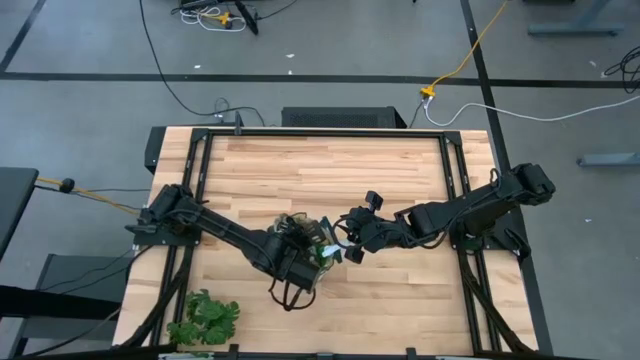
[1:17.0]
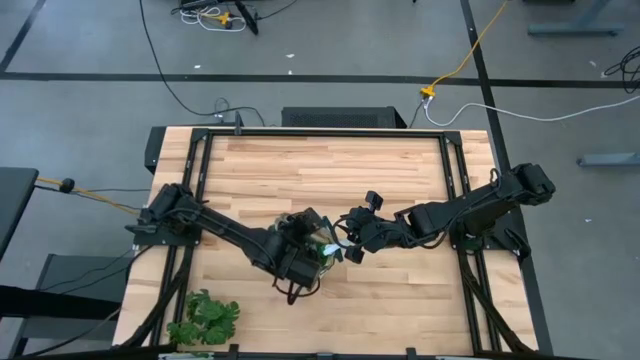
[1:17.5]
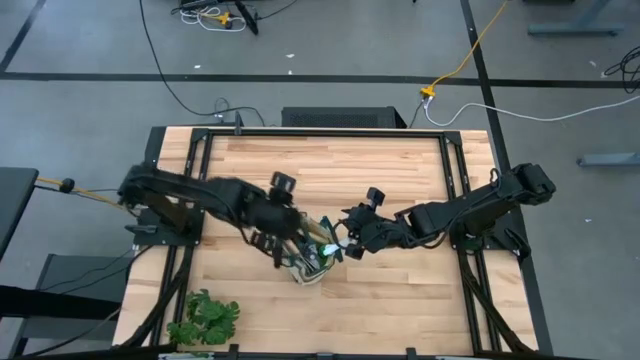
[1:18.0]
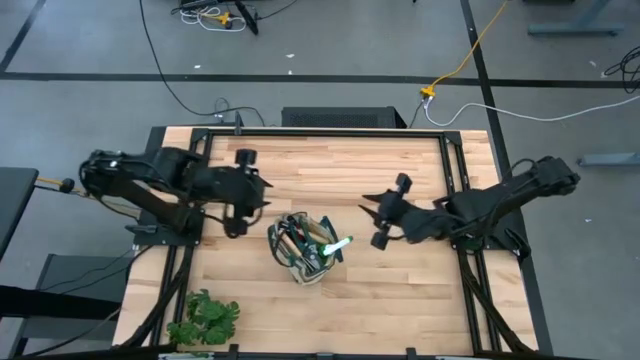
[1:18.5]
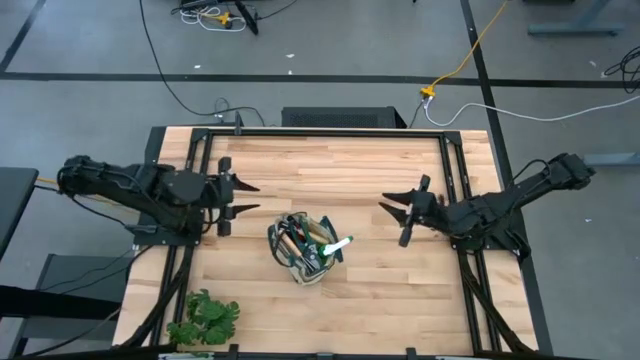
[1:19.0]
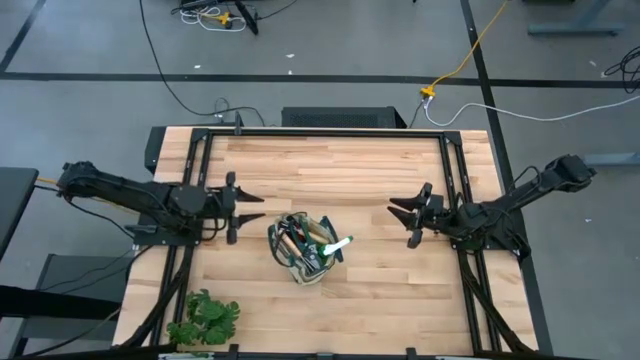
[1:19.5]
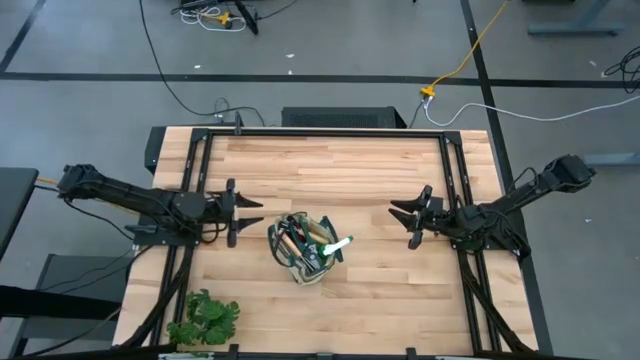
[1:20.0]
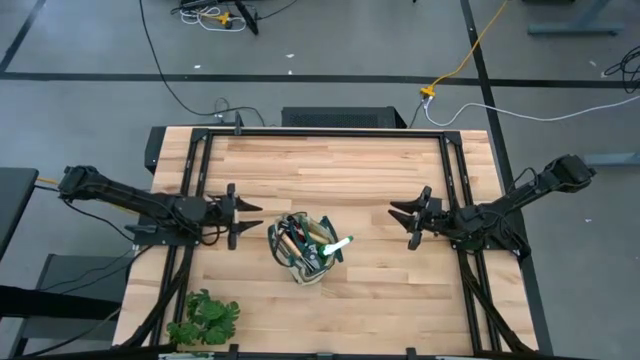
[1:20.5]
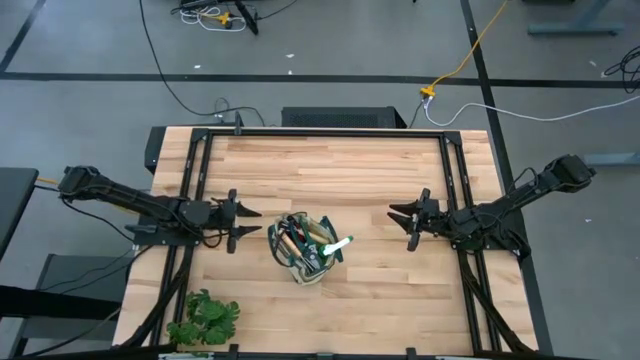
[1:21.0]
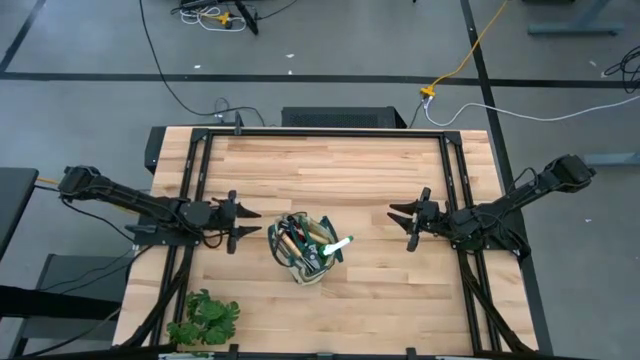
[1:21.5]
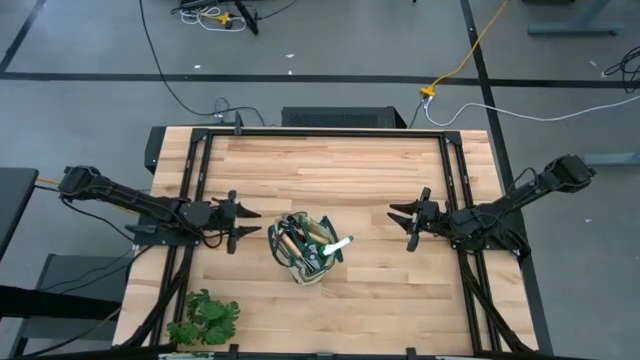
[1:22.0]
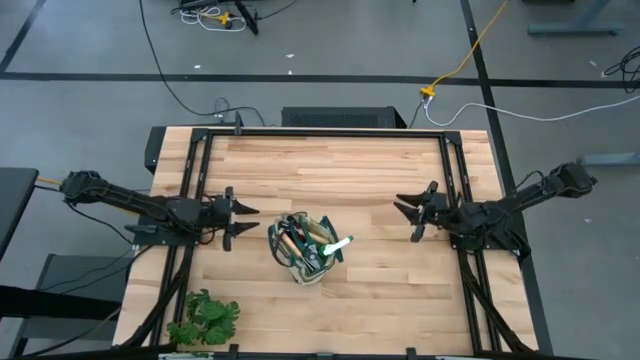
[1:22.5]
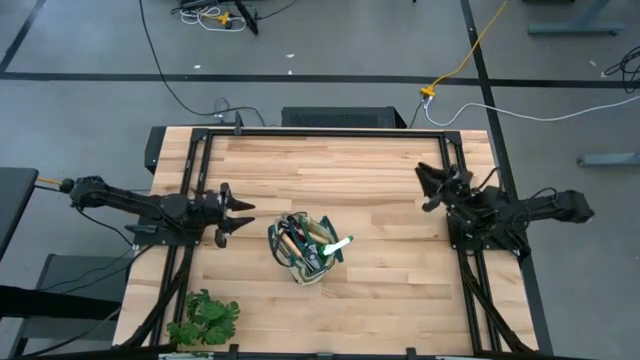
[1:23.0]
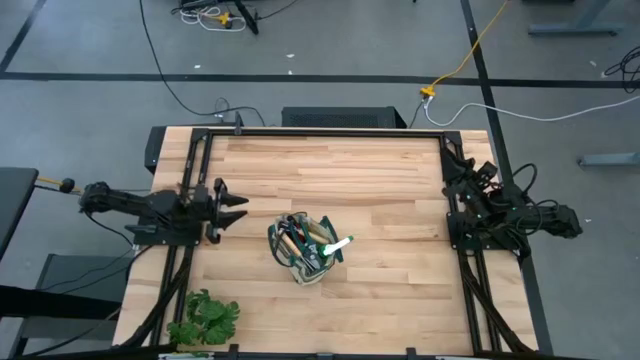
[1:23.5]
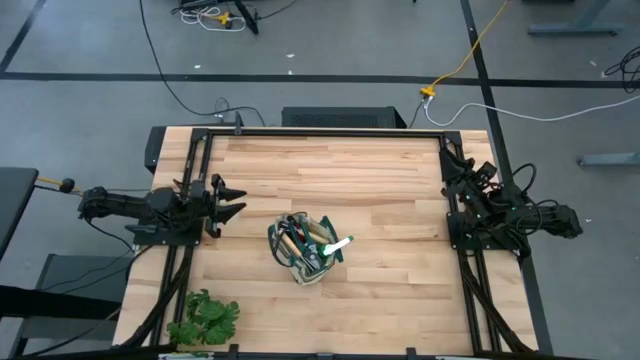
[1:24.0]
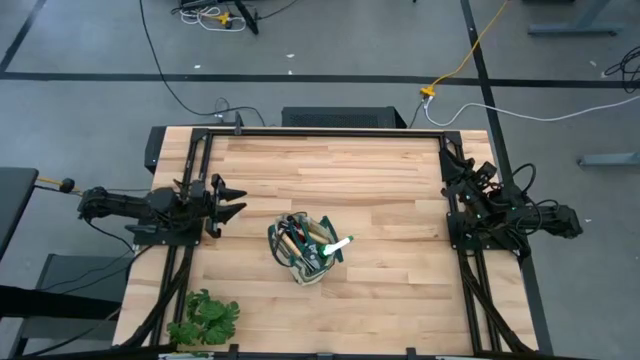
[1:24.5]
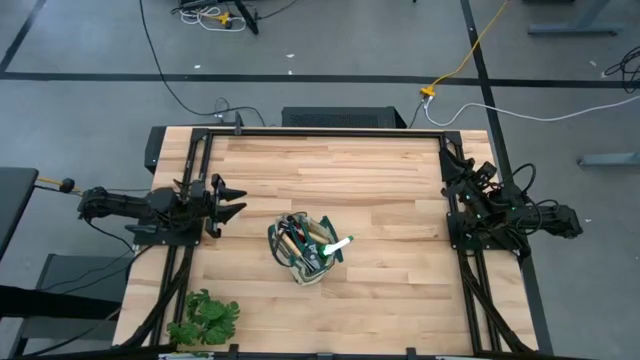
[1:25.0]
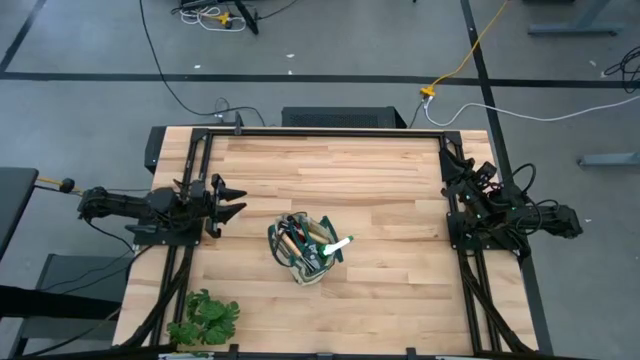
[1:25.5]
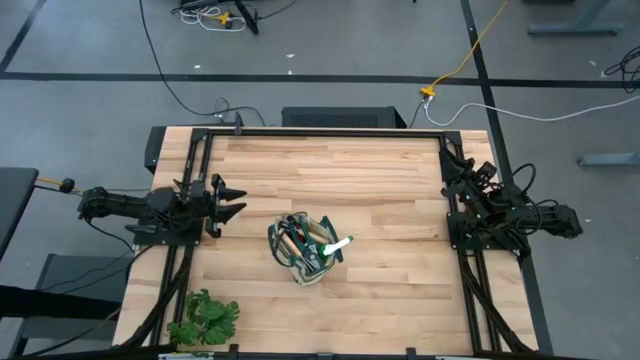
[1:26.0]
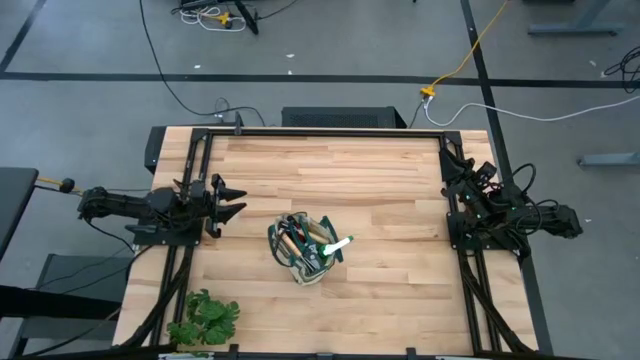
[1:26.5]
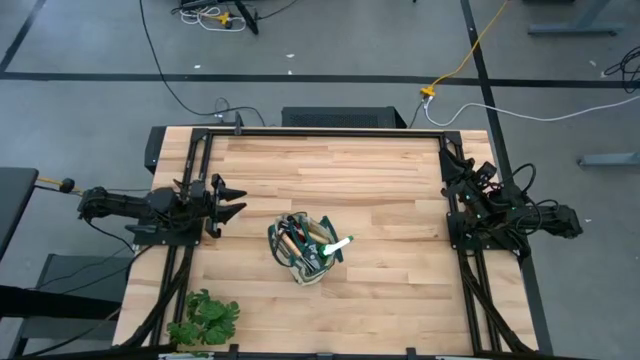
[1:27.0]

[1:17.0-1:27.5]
Task: Pick & Place Garden tools in Gardening bag
Return to Home Position

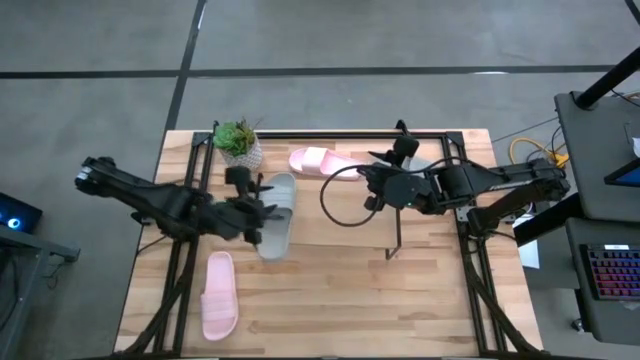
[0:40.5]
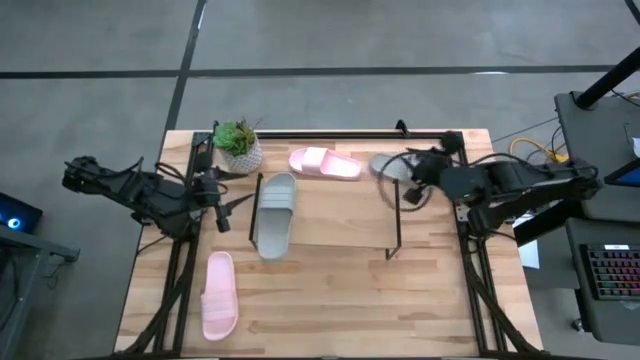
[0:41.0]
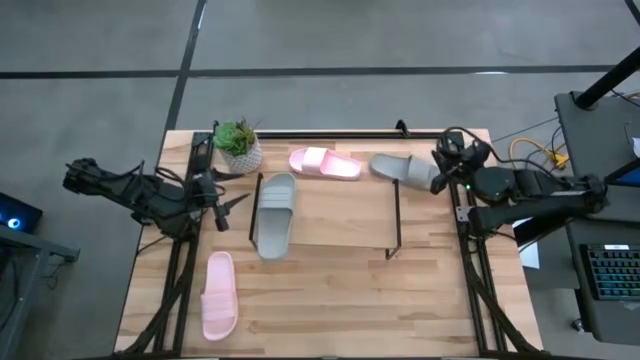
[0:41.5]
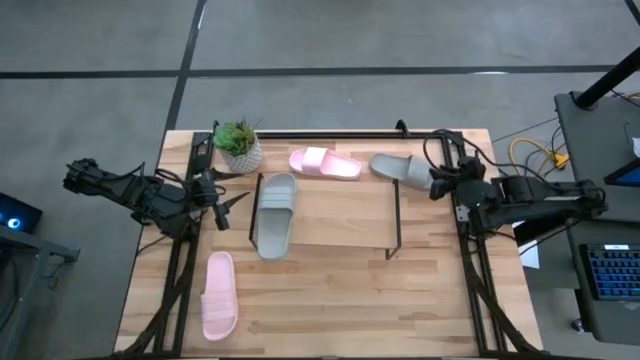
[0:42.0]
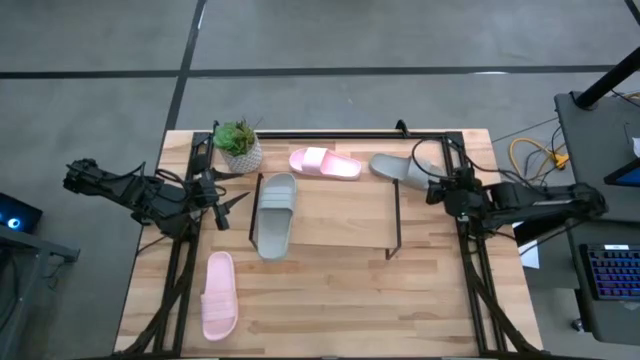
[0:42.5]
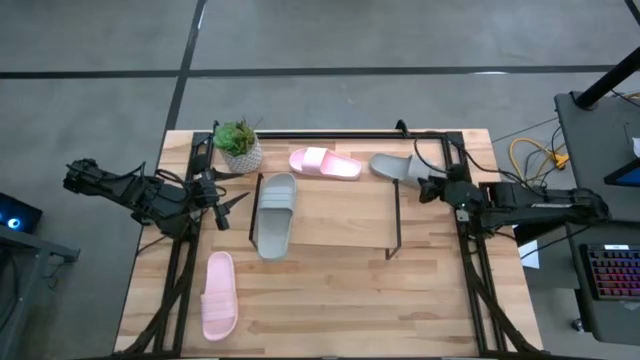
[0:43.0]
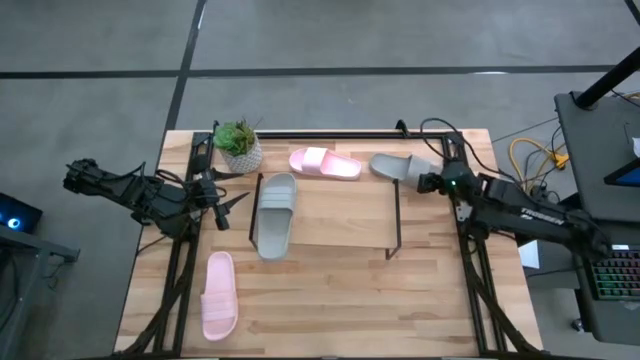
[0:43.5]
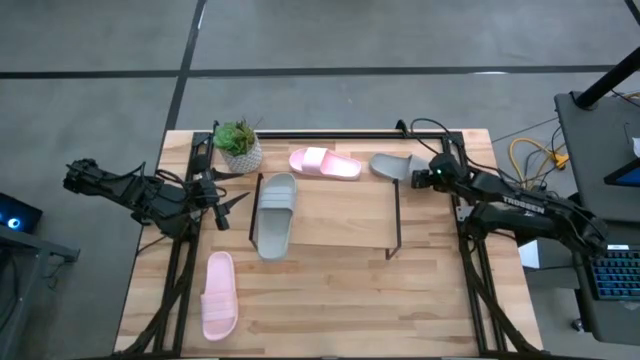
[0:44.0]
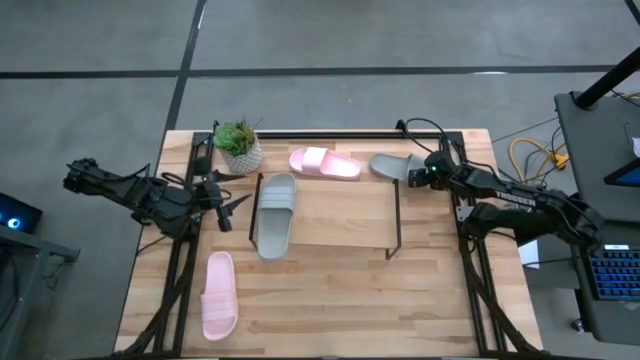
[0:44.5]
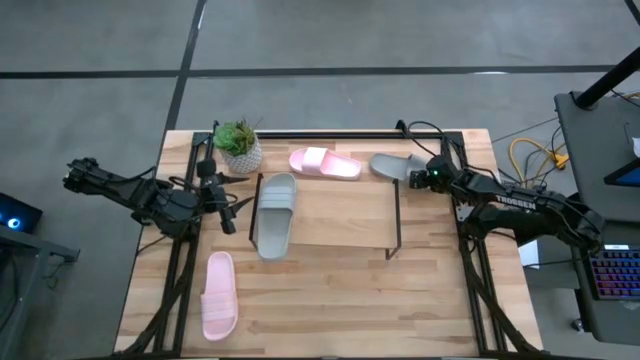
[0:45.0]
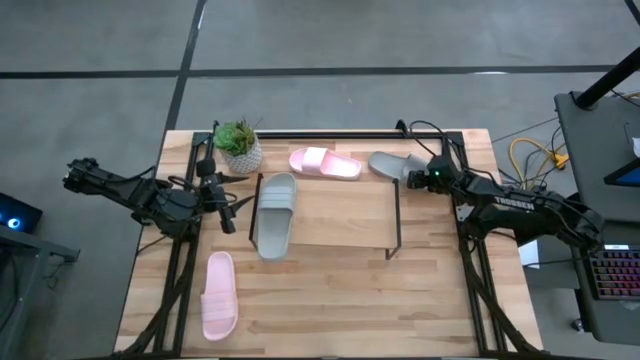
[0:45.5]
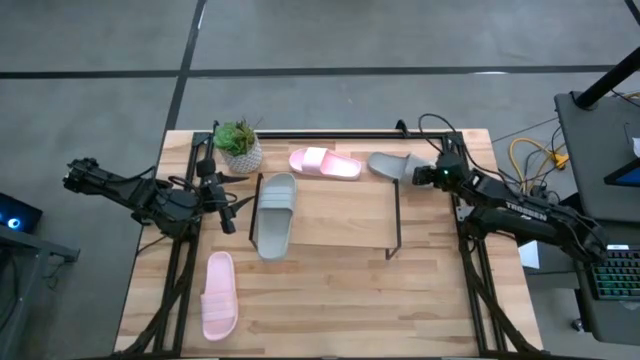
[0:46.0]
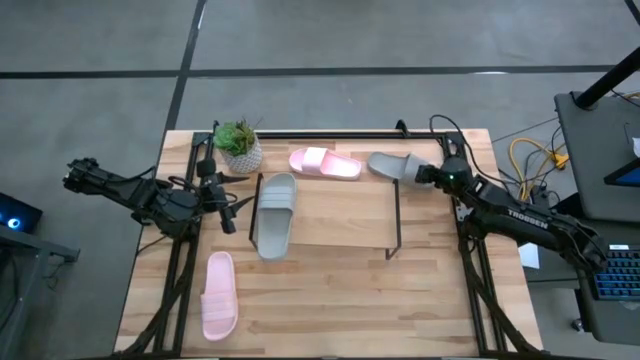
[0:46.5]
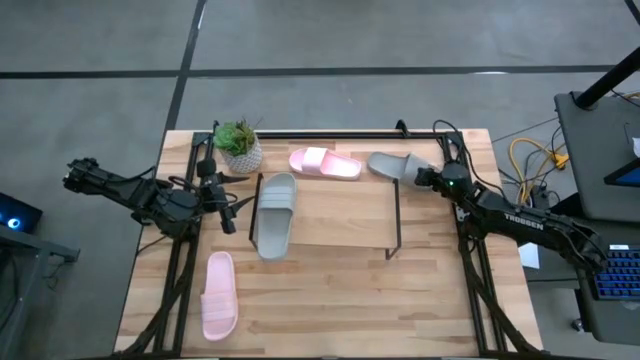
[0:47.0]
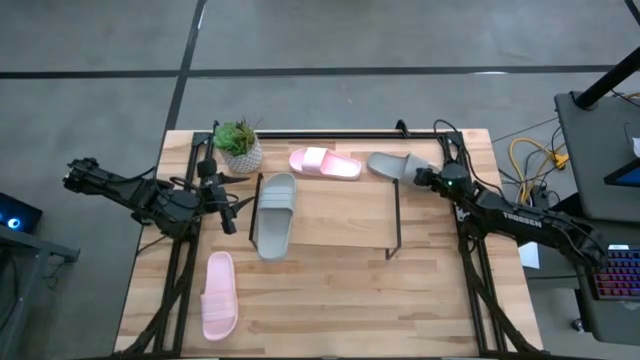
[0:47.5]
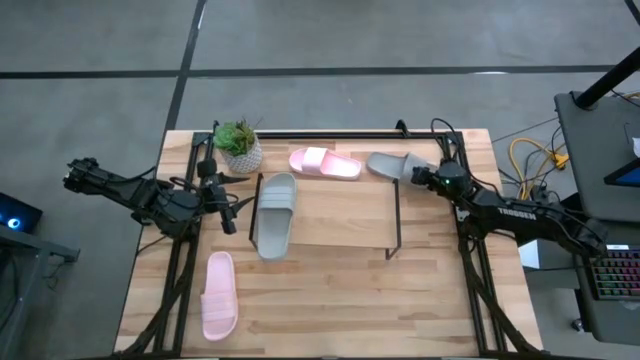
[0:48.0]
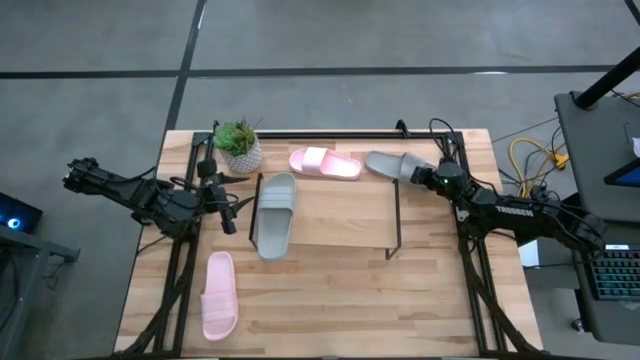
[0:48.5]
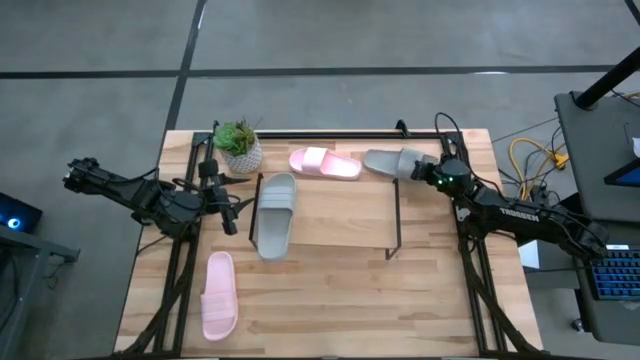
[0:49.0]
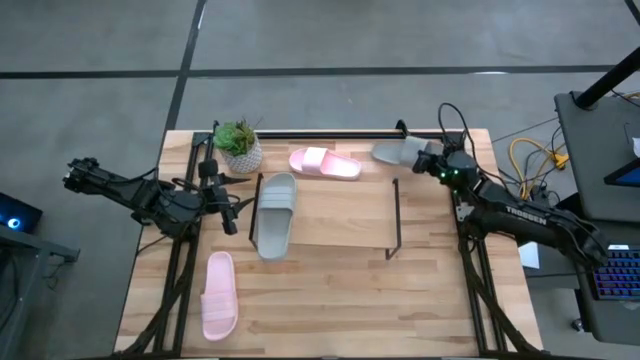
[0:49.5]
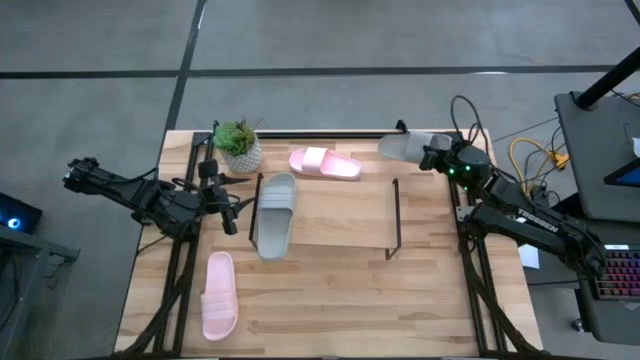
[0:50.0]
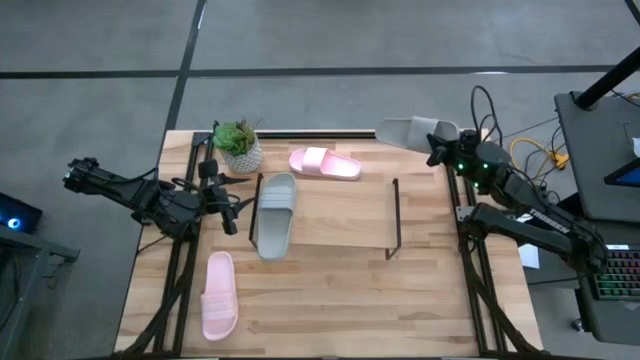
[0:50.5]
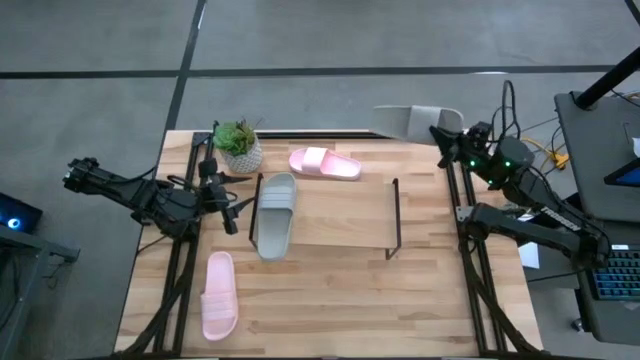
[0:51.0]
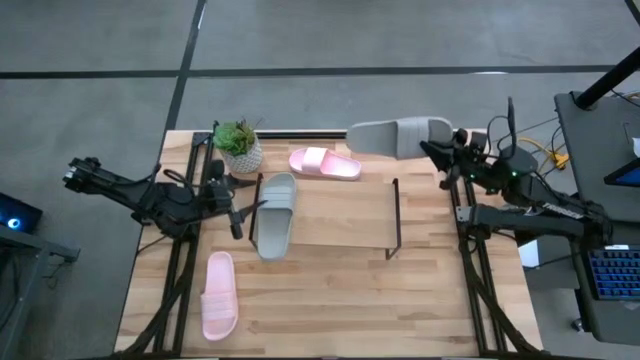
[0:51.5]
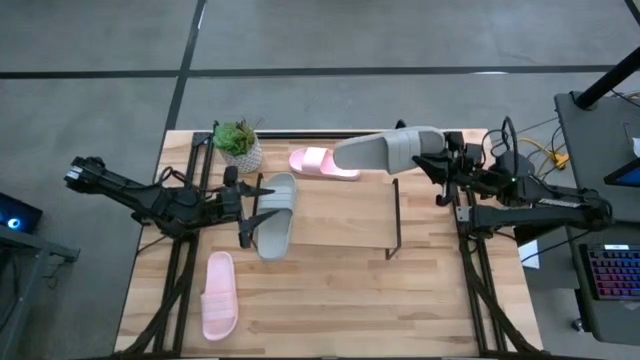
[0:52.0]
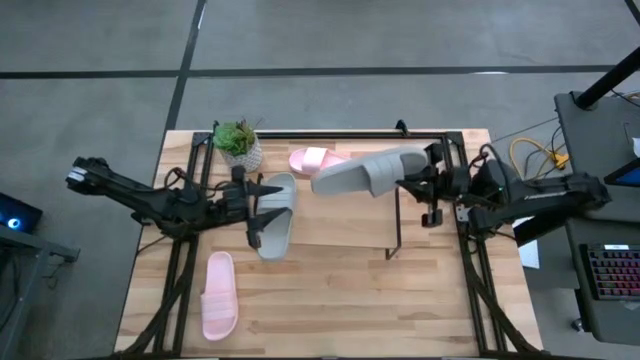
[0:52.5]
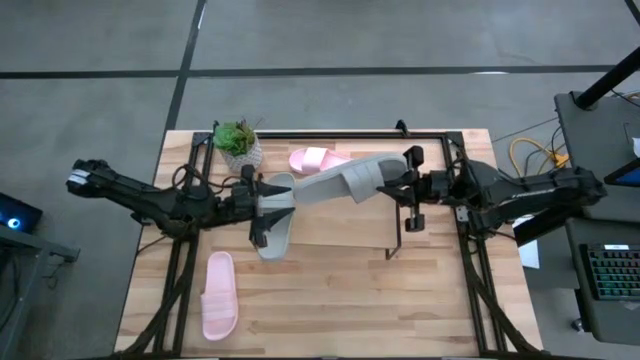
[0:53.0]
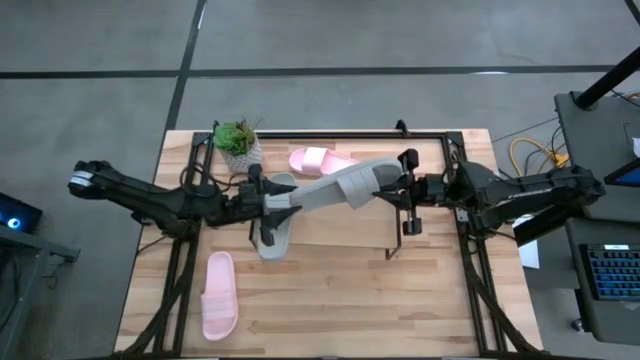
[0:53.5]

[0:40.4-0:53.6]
Task: Pick and place slides into the shelf
Put the gray slide on the shelf
